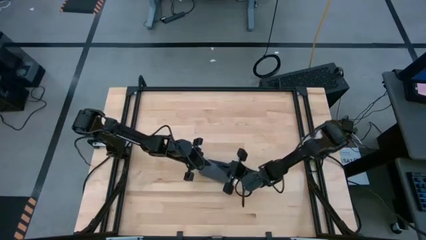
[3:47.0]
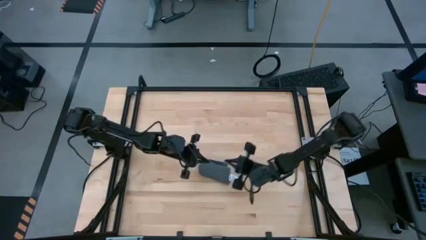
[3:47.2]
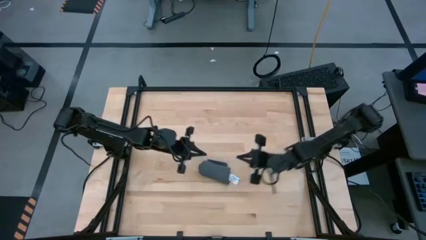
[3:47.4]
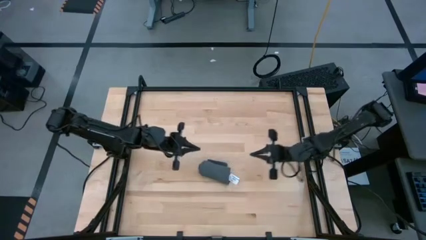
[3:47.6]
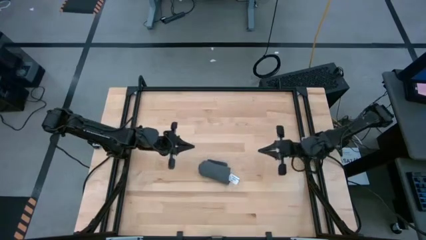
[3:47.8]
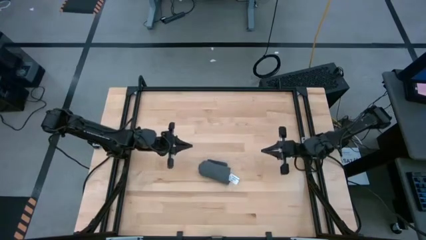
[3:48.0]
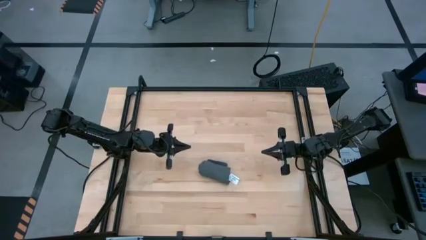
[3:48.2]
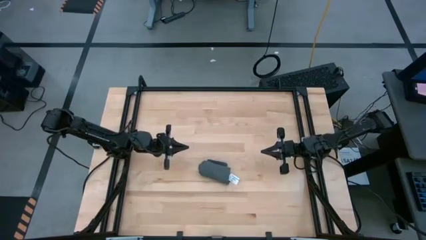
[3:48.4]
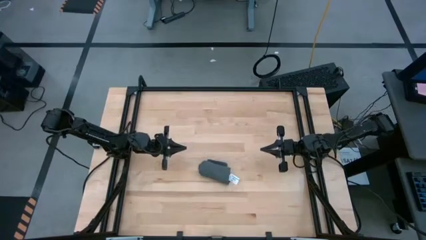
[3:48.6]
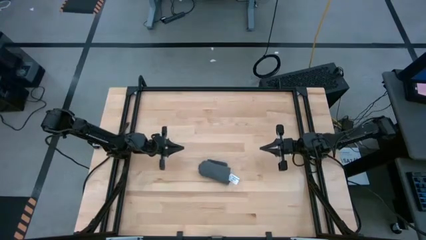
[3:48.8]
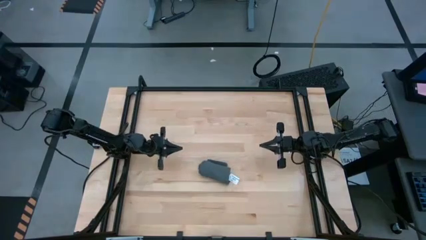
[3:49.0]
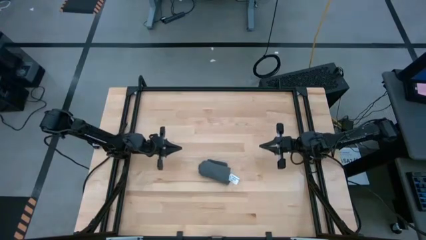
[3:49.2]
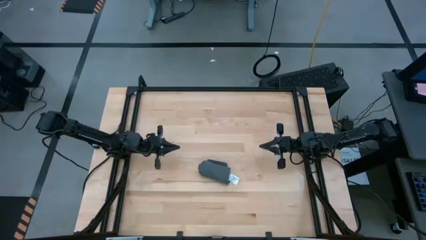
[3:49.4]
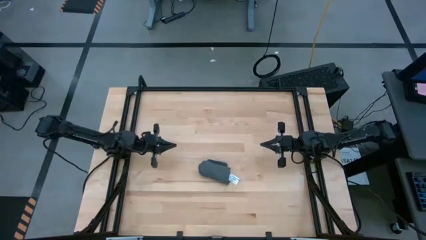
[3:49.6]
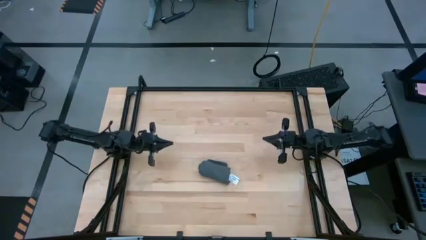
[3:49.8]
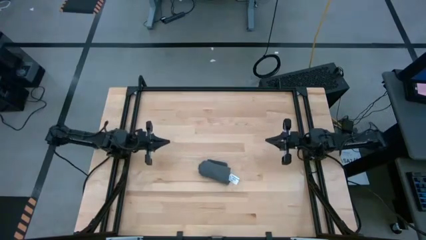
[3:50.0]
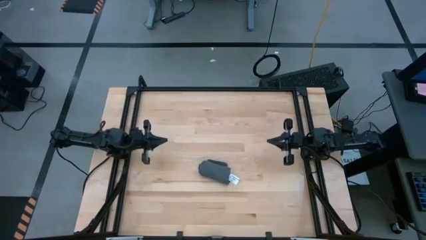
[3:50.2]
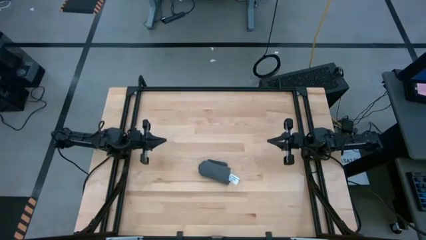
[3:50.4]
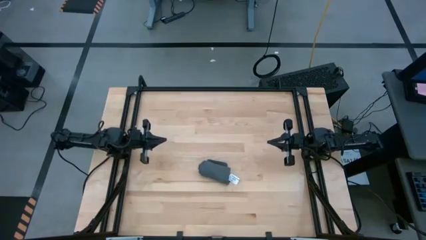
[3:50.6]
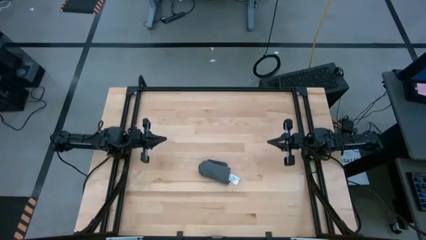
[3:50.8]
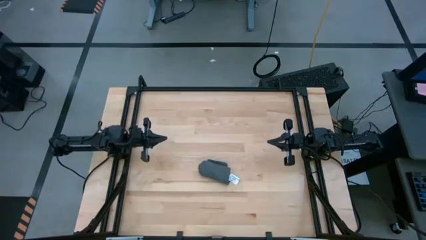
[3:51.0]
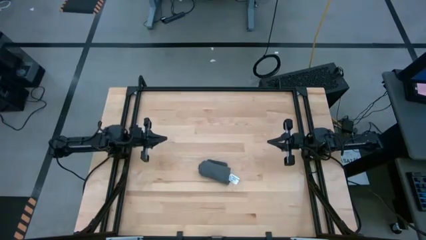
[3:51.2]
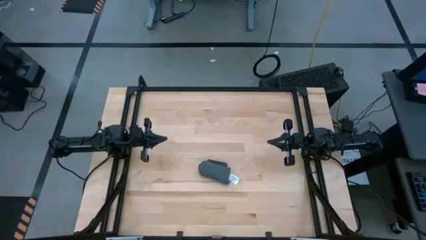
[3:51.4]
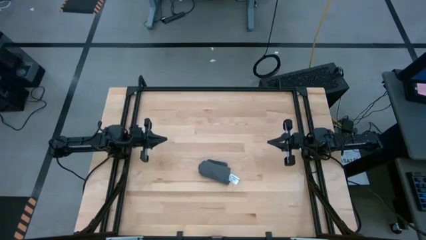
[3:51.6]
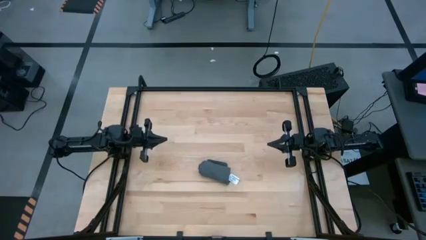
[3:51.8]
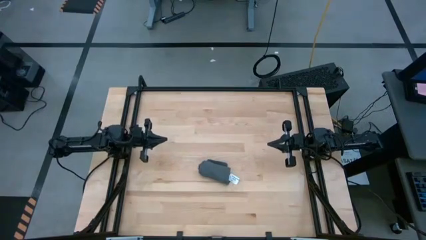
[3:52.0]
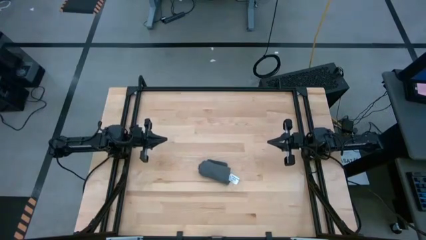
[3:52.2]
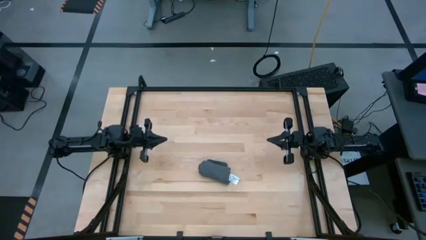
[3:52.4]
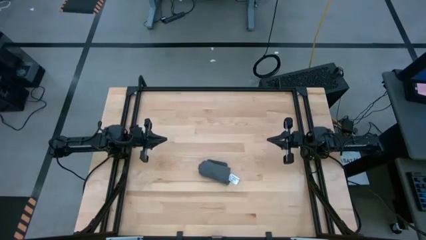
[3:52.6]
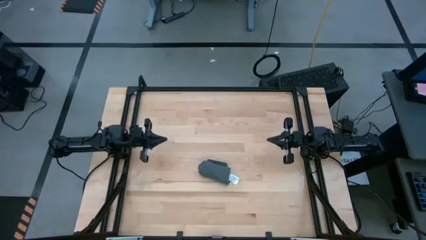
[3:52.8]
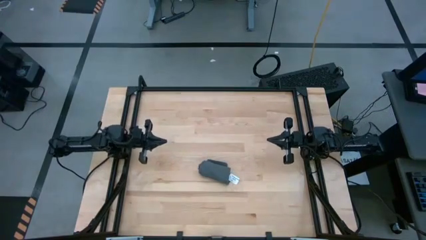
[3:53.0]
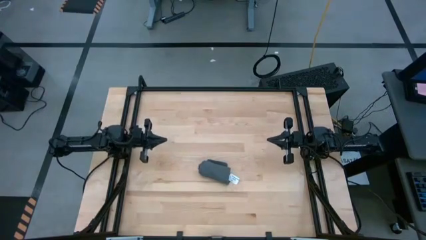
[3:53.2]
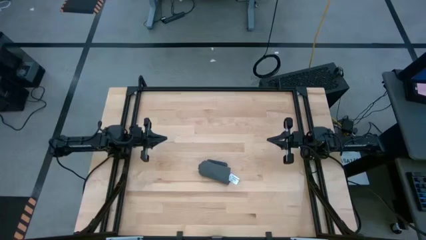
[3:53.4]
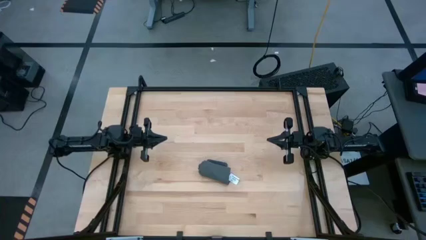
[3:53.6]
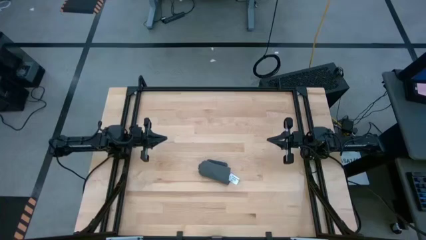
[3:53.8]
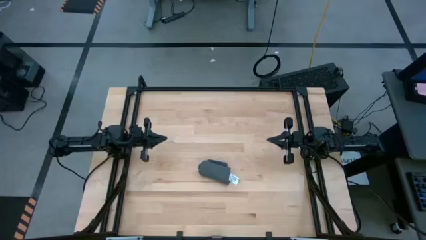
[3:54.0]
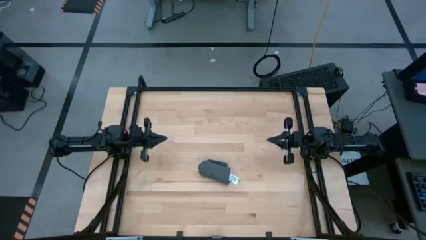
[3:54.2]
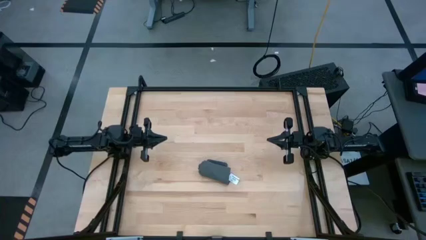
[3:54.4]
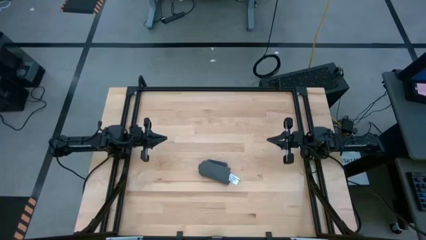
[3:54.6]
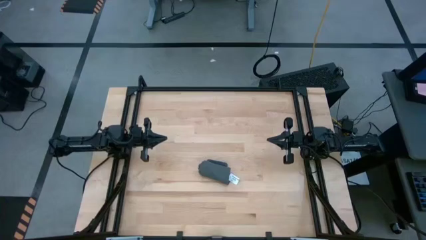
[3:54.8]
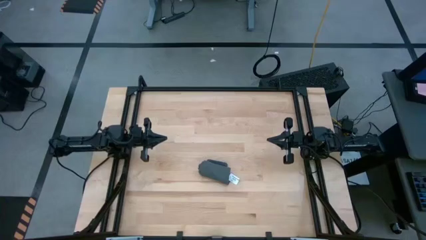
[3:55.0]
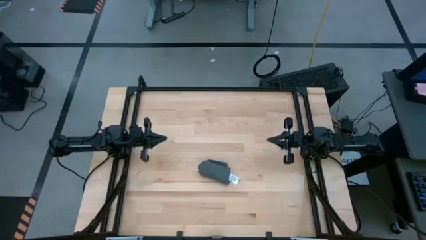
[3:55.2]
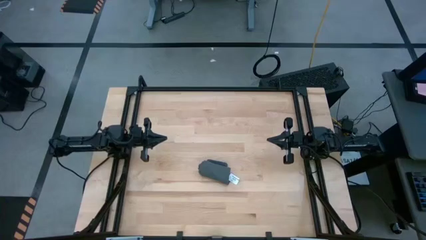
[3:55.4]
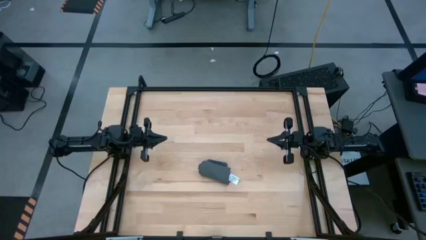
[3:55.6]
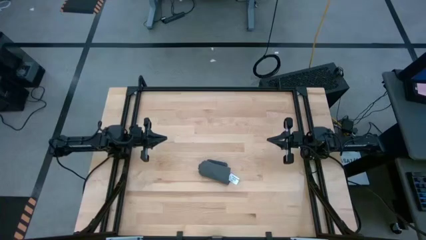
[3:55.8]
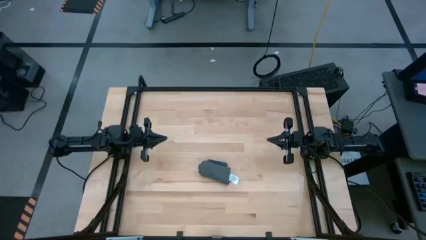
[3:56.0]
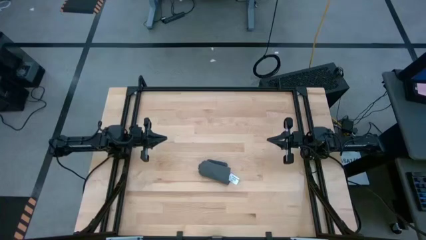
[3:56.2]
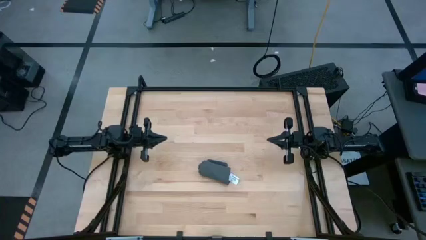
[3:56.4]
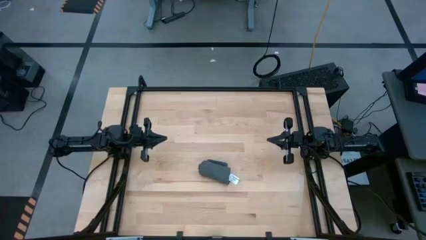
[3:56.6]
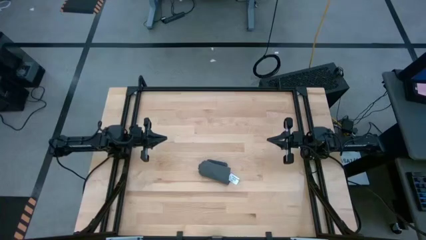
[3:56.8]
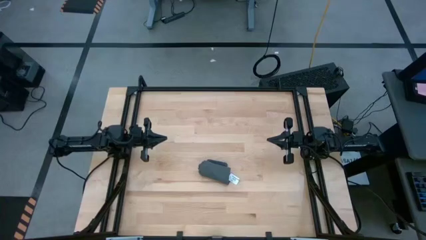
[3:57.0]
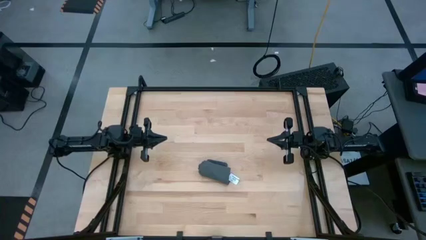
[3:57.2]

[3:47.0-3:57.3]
Task: Roll towel into tight, uniform cylinder
Return to Home Position

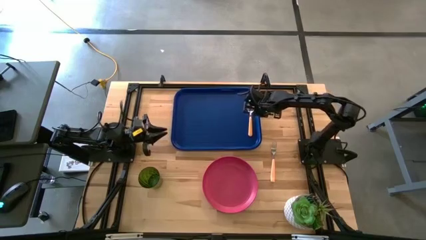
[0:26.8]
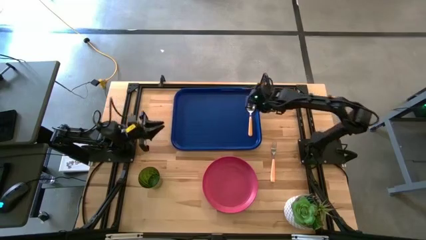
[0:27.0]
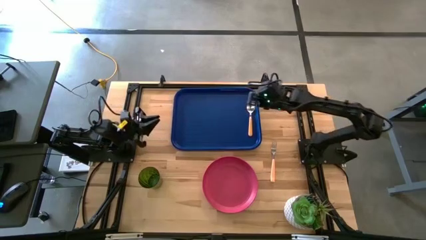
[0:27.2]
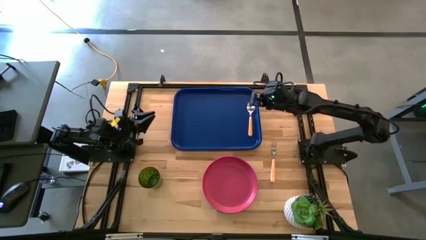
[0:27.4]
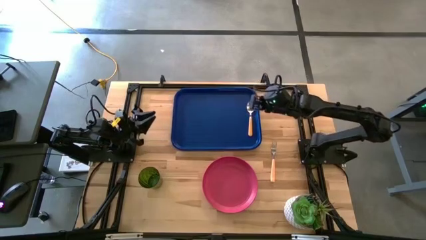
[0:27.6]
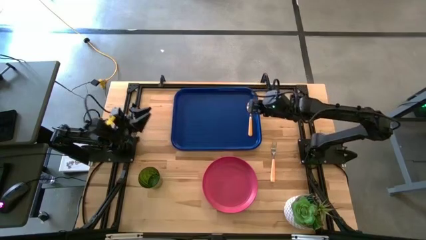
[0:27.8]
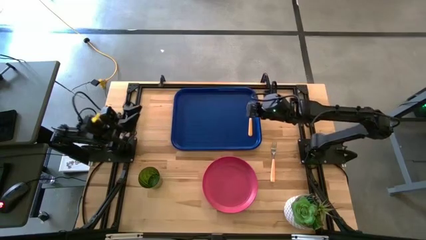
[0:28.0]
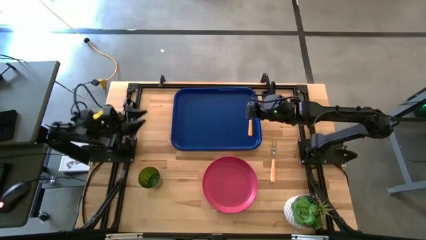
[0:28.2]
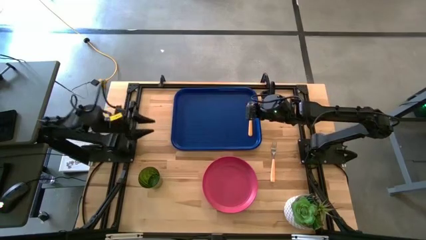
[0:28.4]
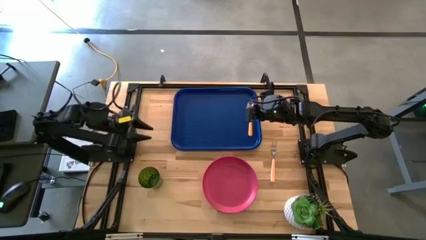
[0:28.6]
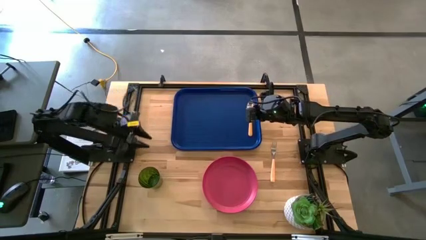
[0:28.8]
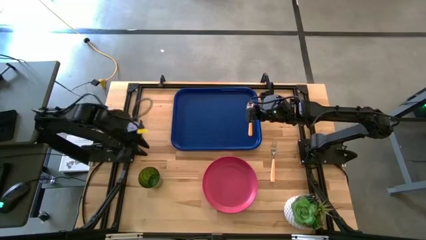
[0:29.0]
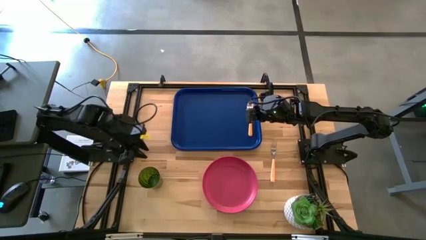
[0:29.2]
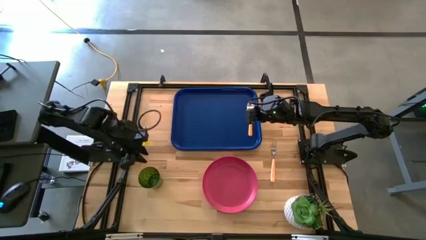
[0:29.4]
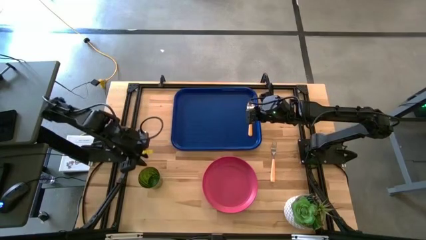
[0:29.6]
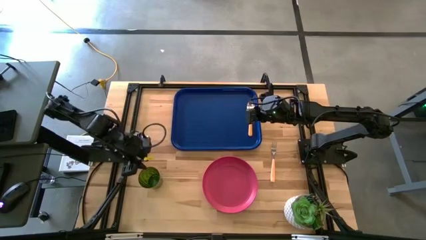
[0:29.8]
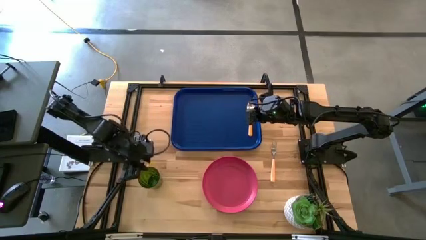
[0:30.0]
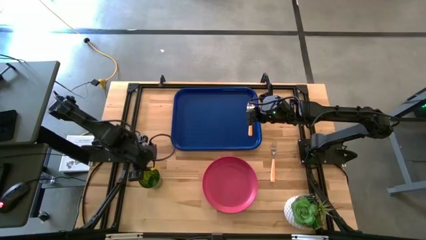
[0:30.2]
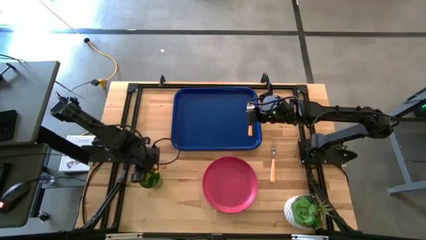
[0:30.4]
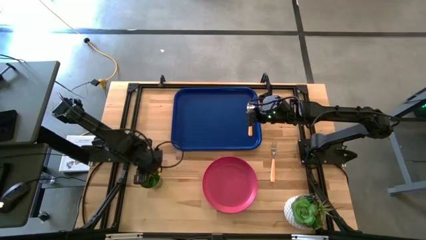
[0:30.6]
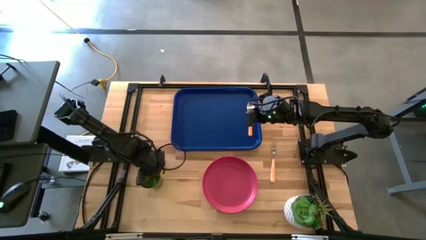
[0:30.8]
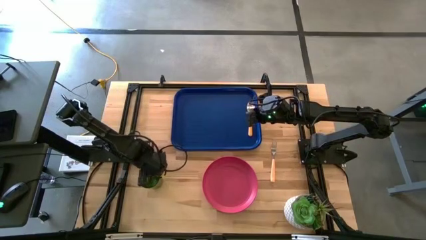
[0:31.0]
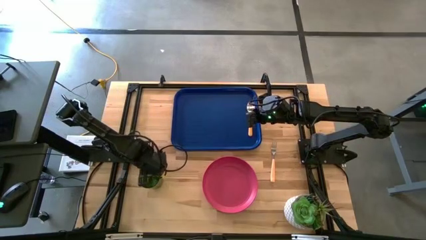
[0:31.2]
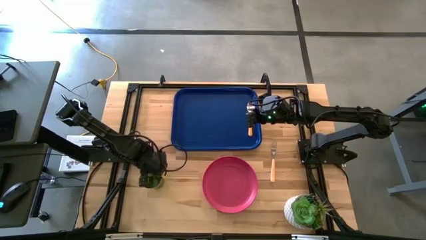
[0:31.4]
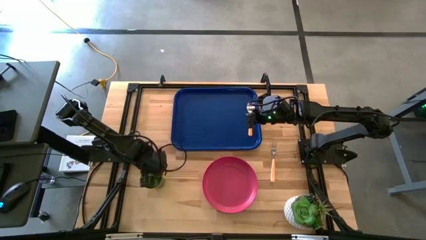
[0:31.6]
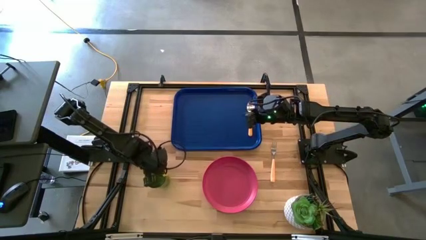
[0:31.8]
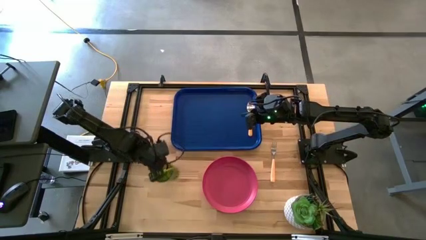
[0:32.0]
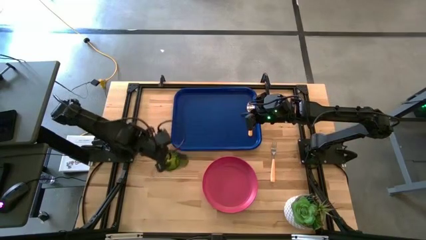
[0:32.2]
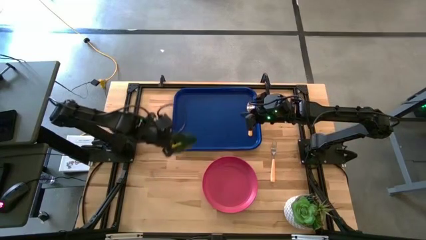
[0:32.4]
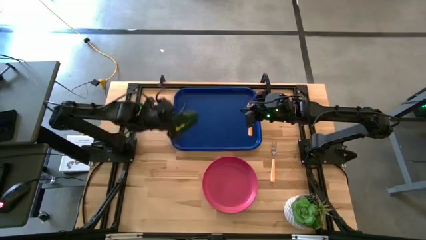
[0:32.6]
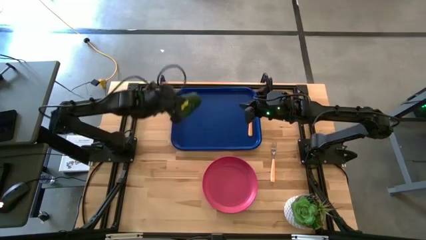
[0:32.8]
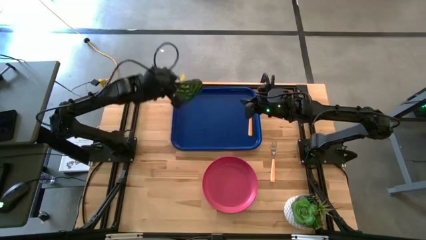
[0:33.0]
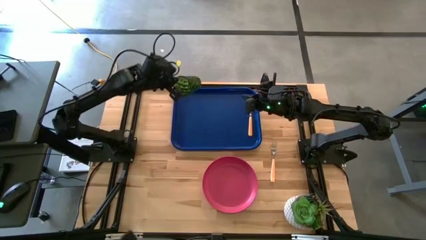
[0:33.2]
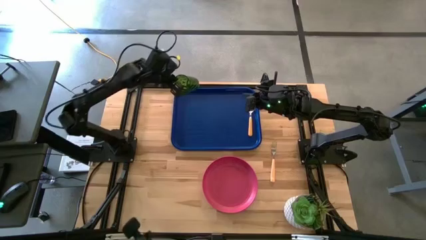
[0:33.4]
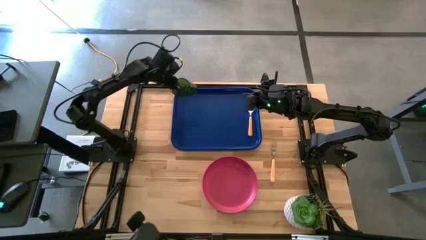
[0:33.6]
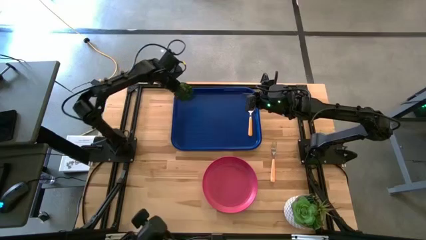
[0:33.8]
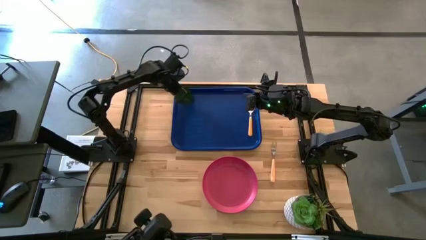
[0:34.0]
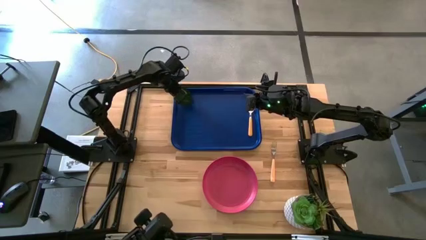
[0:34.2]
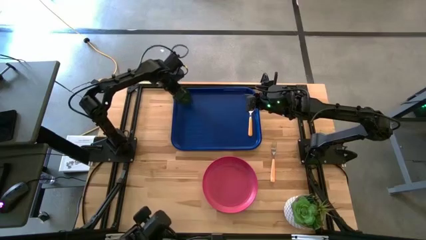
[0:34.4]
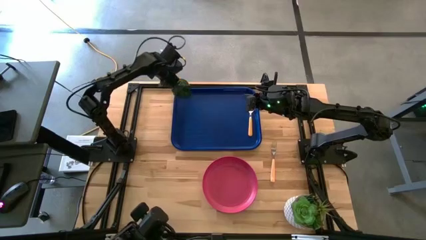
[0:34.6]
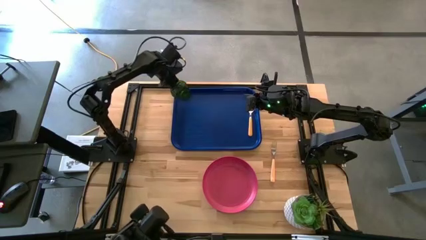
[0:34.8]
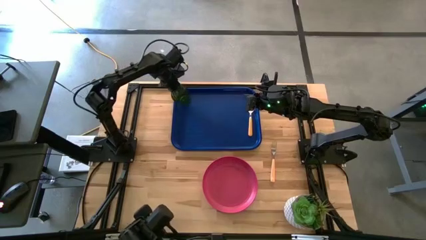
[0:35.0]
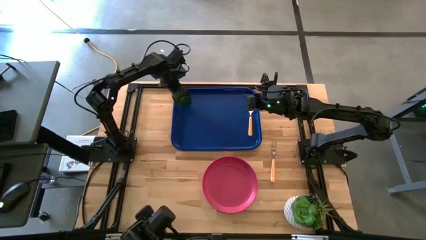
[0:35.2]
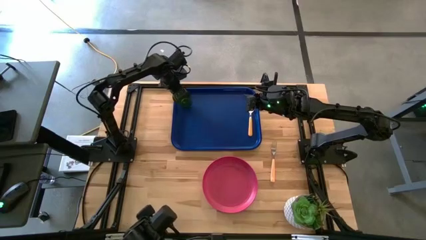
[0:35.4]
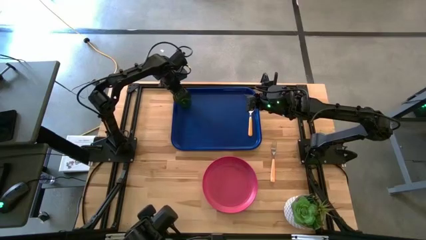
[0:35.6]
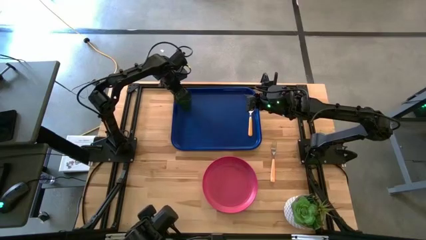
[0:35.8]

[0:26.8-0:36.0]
Task: Pick and place plate/cup/fork/spoon on tray
Put the green glass on the blue serving tray
